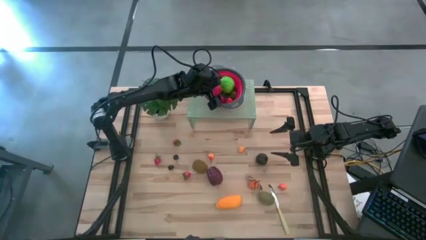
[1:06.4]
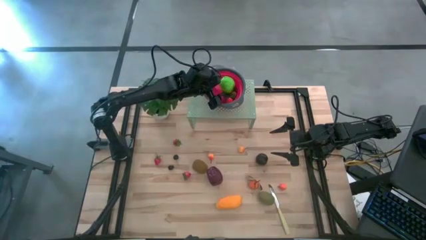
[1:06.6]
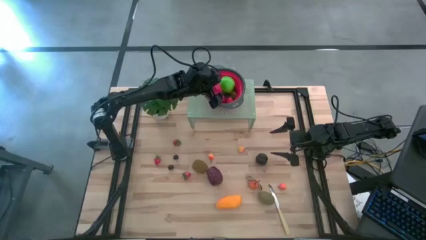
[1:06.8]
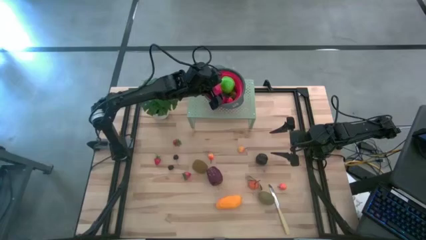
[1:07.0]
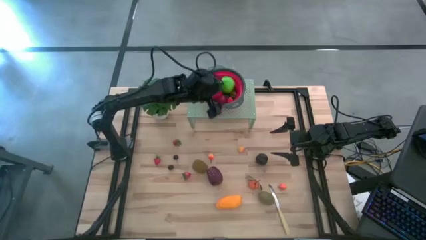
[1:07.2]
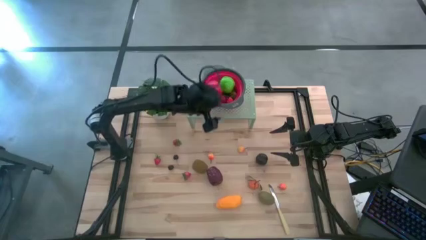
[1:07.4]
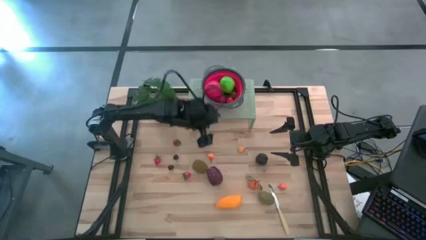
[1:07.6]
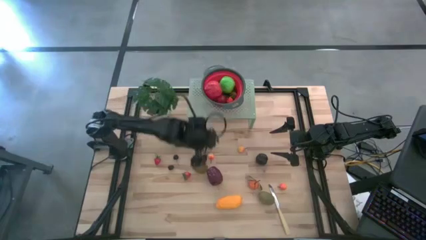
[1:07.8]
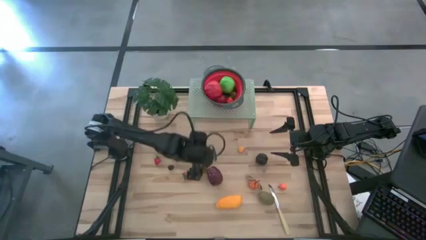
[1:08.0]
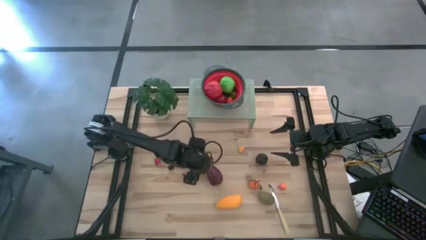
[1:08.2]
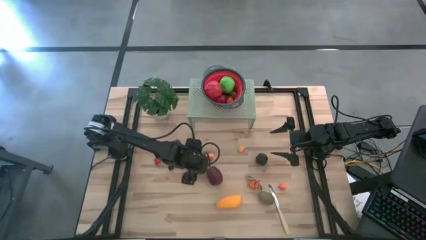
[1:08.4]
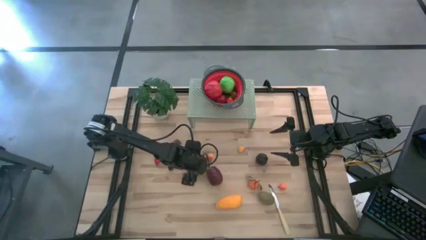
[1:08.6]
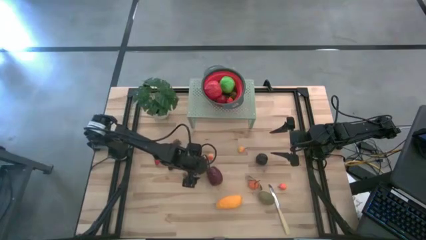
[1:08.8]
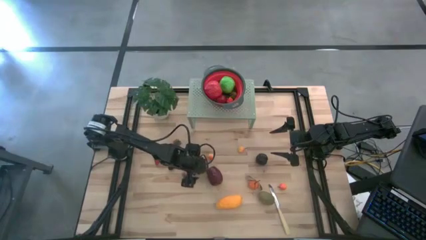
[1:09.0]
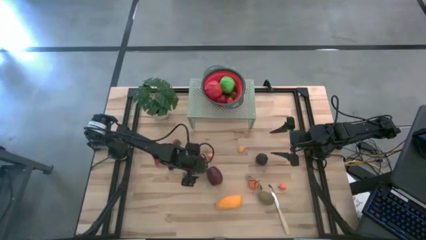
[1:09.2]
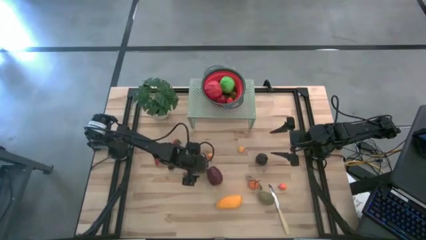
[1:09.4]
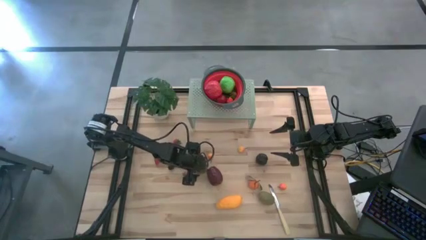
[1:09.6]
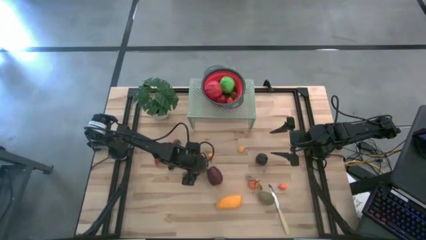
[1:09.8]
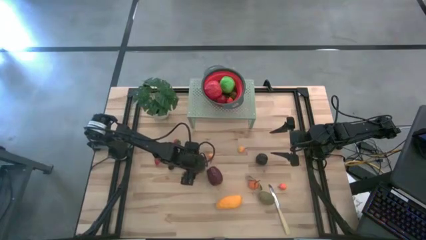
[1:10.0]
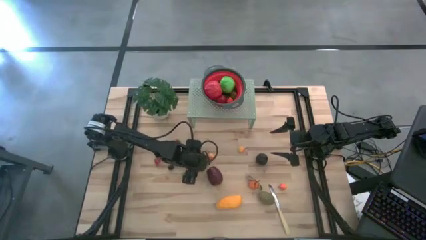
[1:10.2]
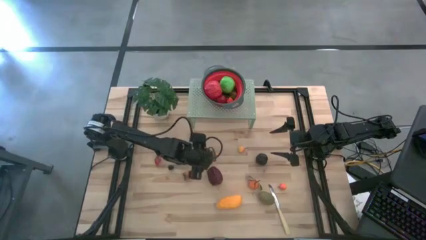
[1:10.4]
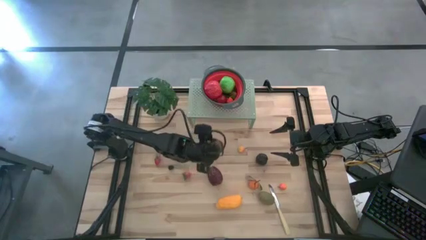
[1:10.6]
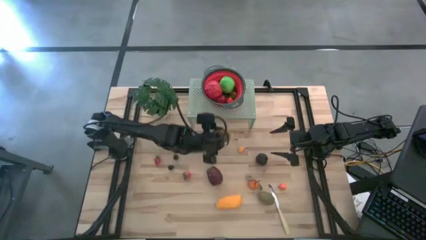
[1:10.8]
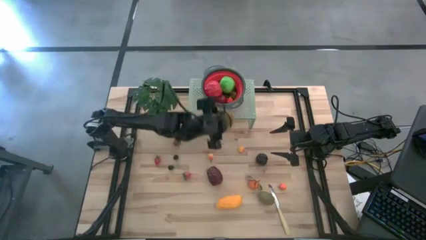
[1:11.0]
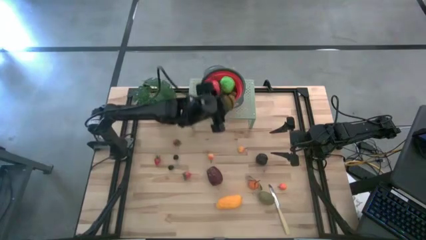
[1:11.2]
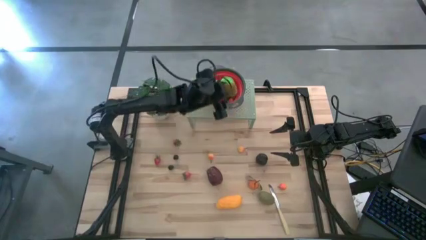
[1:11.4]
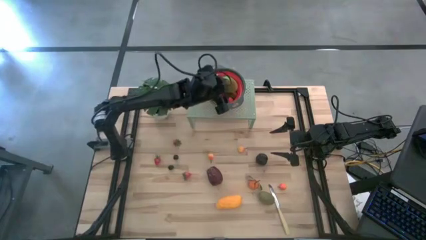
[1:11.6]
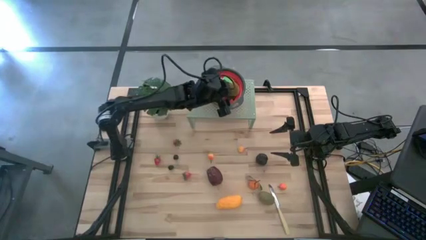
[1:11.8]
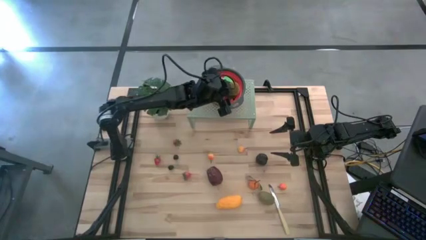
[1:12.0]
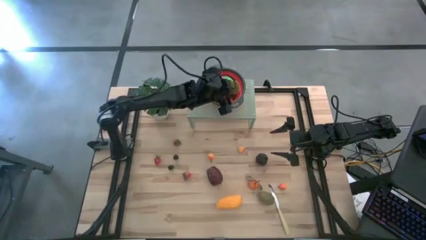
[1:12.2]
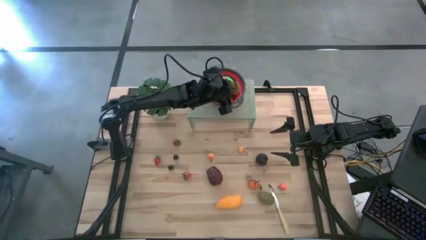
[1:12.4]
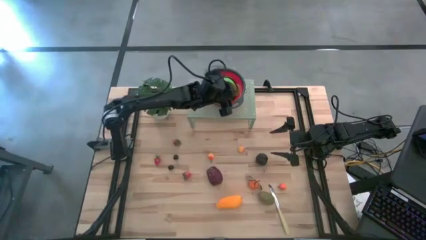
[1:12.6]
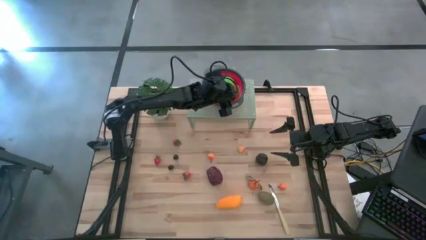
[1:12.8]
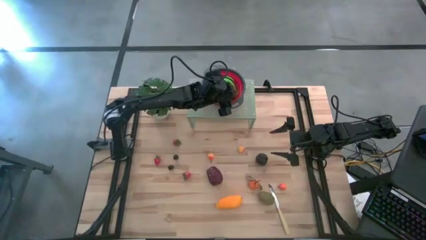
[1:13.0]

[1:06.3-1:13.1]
Task: Pick & Place Fruit
Put the kiwi into the red strainer bowl on the shelf

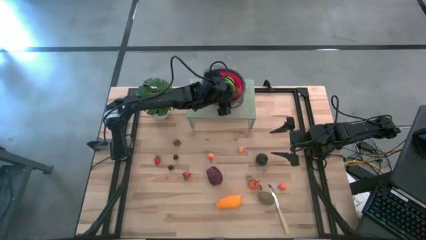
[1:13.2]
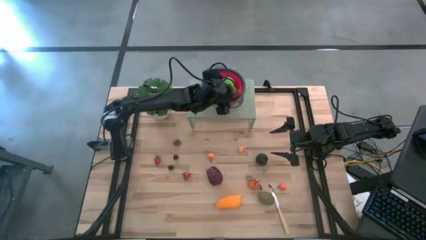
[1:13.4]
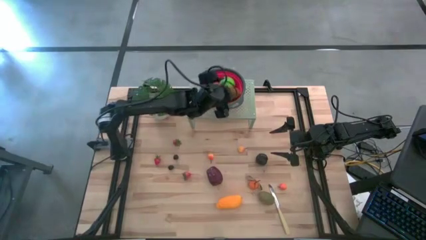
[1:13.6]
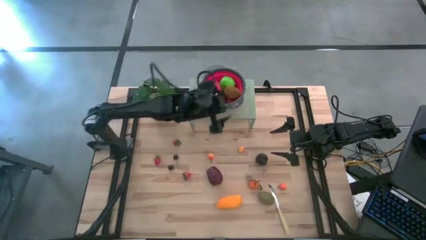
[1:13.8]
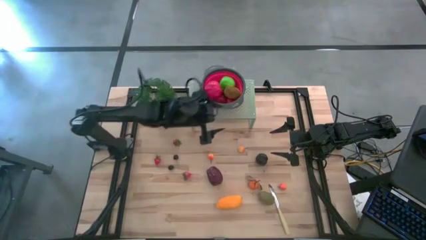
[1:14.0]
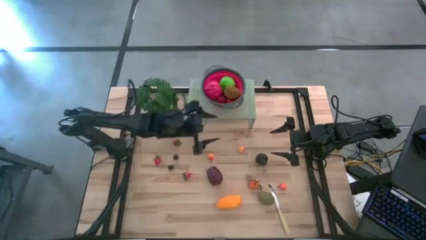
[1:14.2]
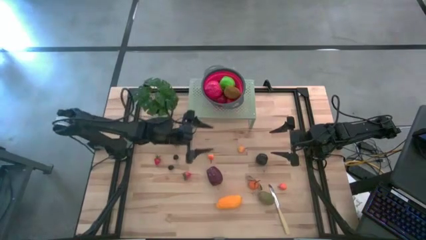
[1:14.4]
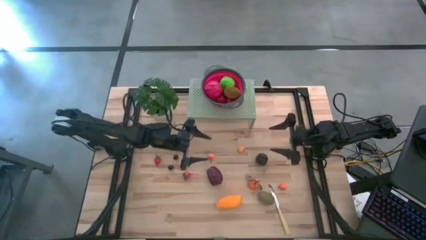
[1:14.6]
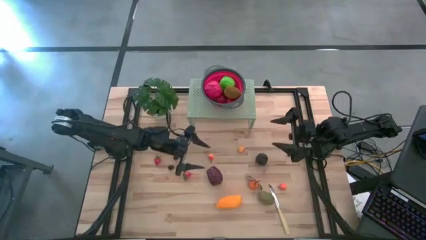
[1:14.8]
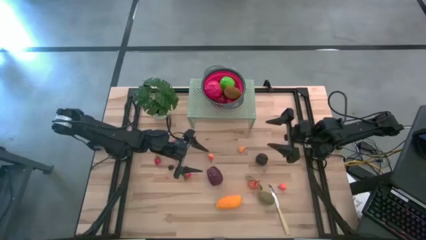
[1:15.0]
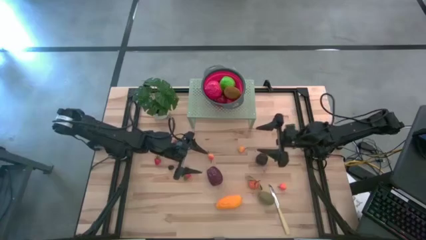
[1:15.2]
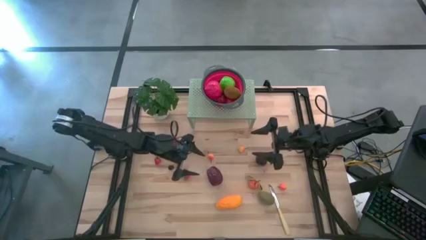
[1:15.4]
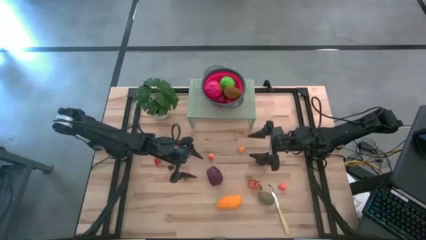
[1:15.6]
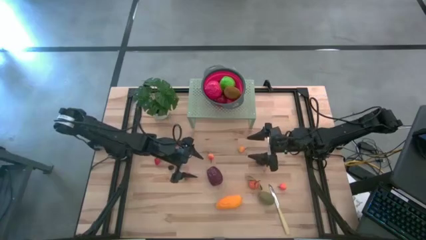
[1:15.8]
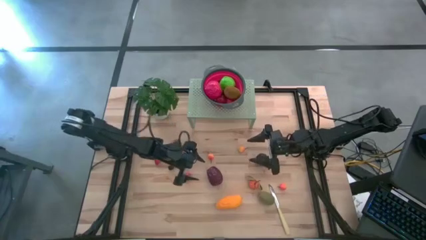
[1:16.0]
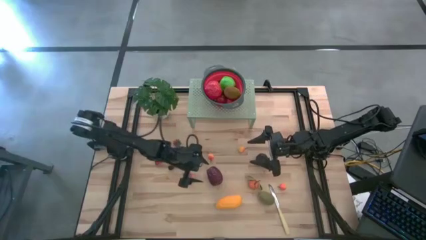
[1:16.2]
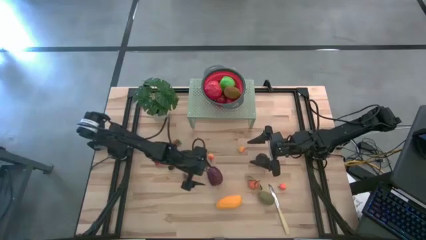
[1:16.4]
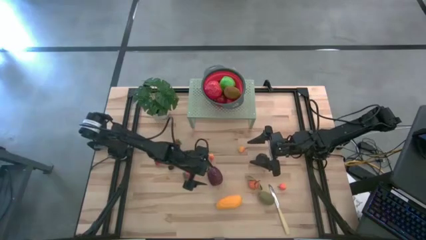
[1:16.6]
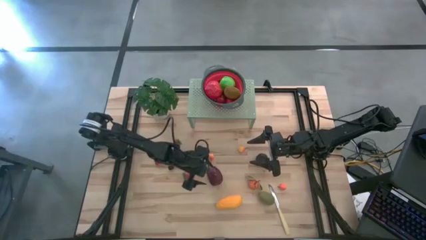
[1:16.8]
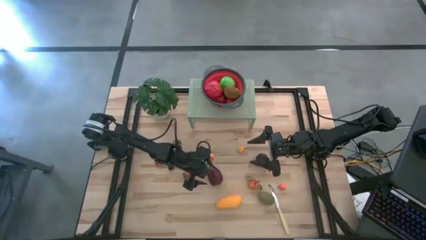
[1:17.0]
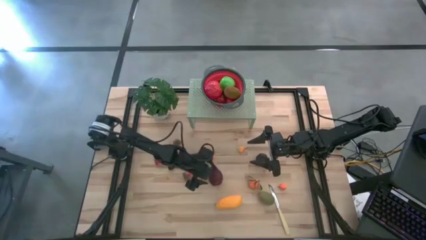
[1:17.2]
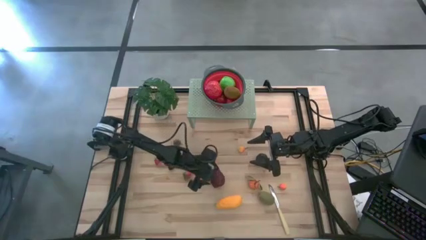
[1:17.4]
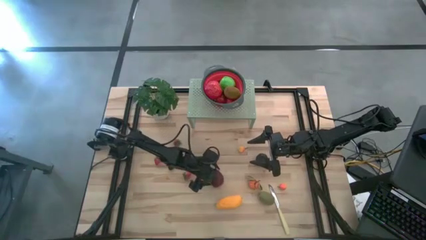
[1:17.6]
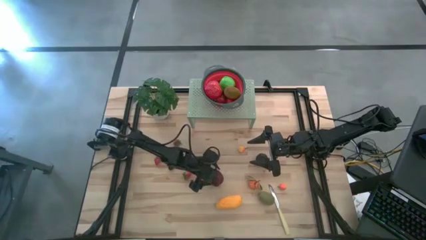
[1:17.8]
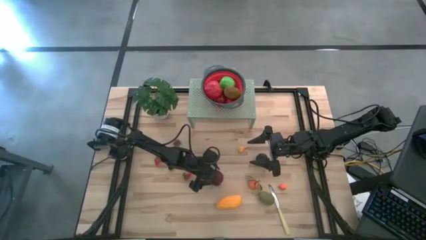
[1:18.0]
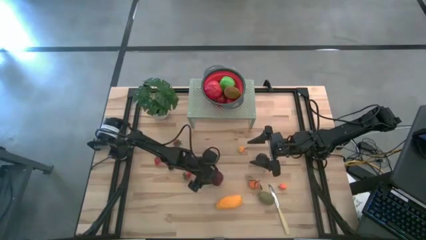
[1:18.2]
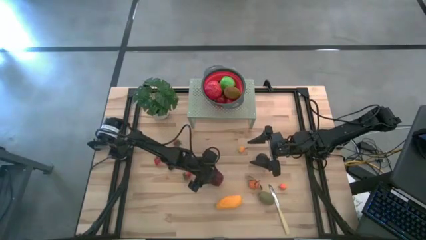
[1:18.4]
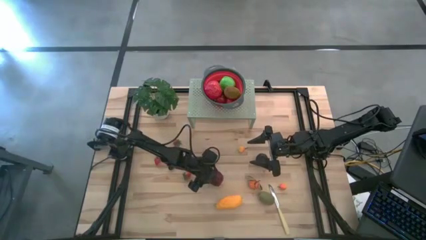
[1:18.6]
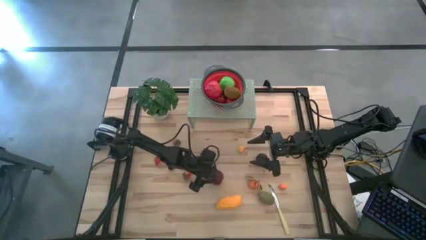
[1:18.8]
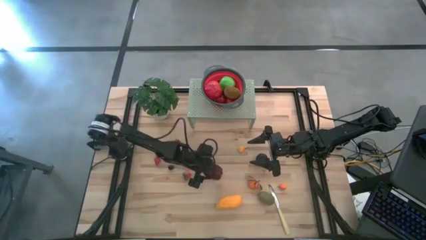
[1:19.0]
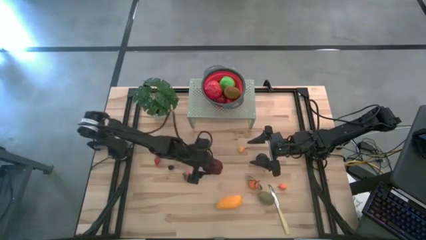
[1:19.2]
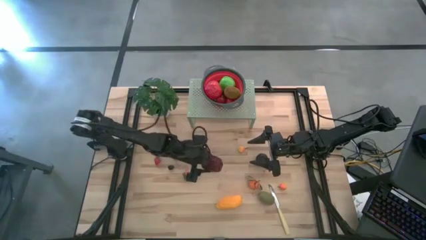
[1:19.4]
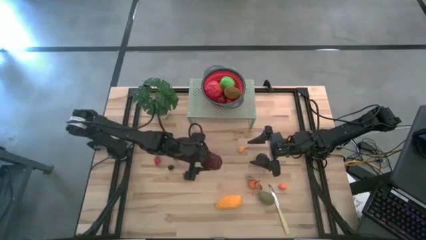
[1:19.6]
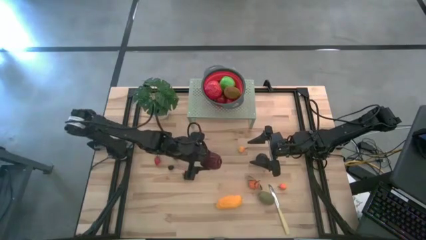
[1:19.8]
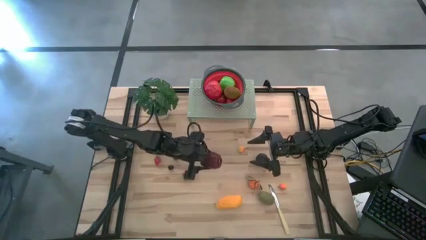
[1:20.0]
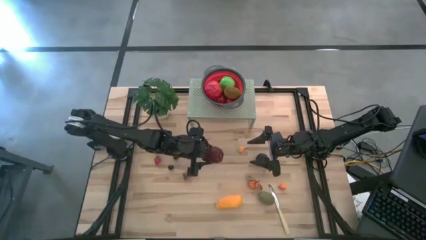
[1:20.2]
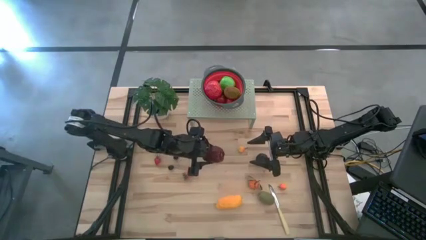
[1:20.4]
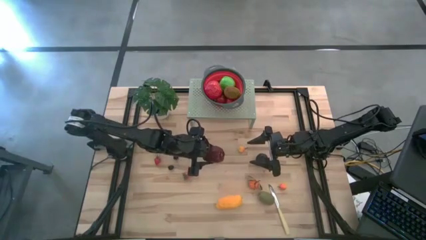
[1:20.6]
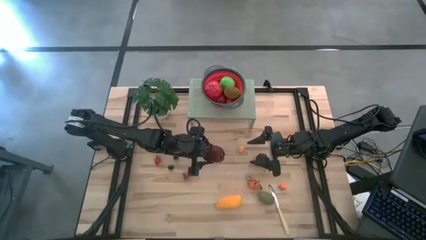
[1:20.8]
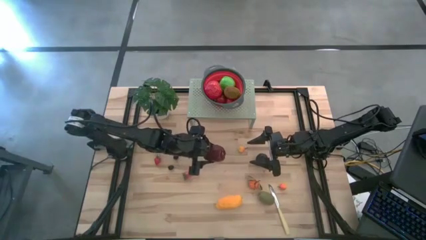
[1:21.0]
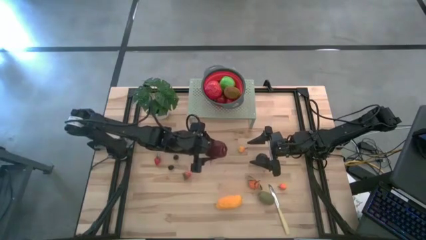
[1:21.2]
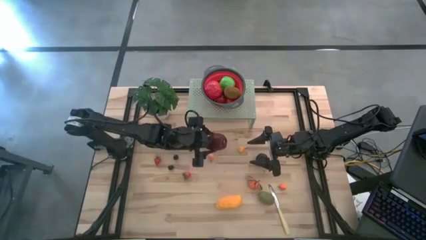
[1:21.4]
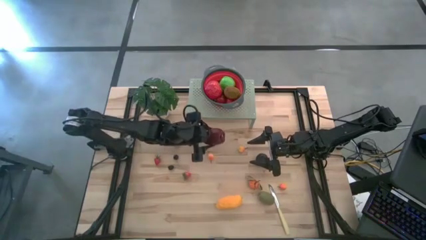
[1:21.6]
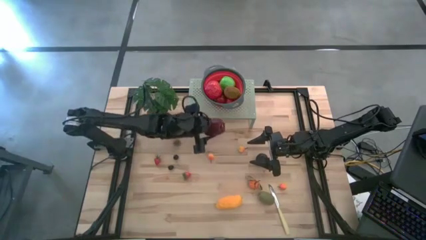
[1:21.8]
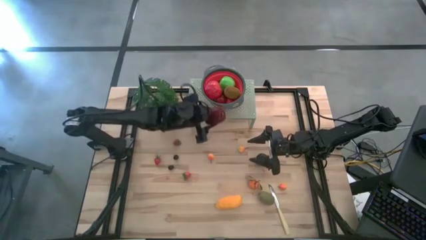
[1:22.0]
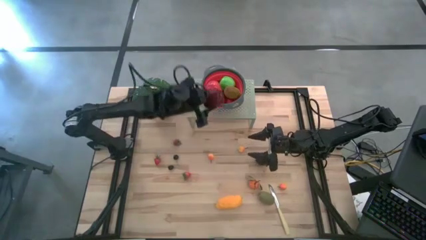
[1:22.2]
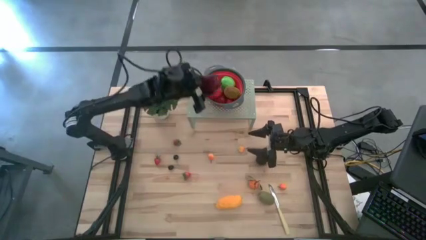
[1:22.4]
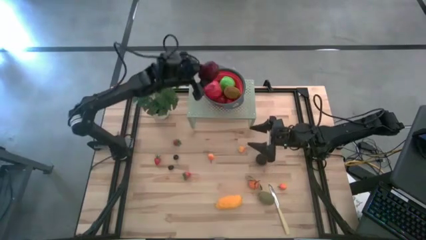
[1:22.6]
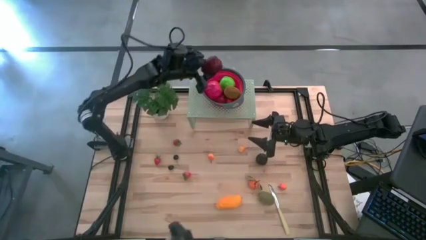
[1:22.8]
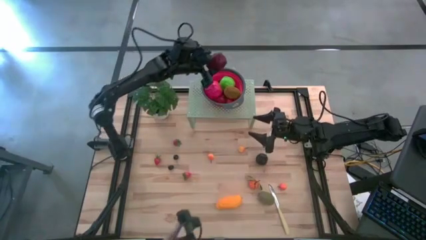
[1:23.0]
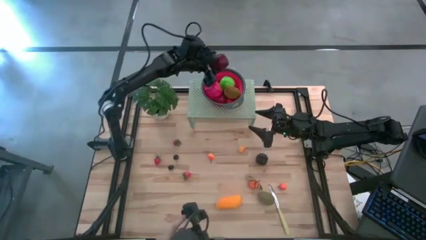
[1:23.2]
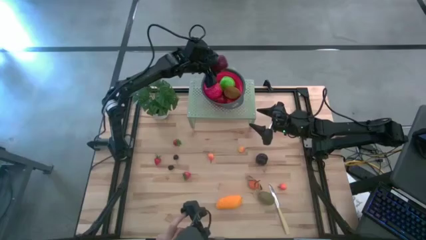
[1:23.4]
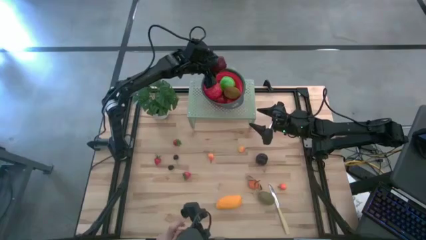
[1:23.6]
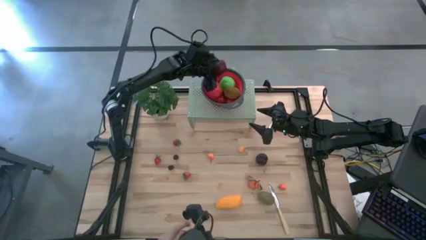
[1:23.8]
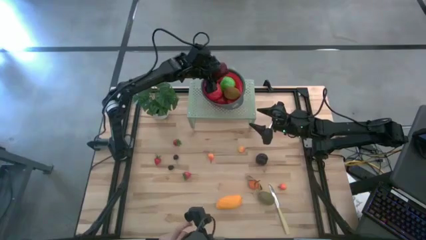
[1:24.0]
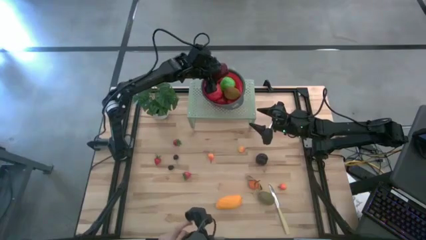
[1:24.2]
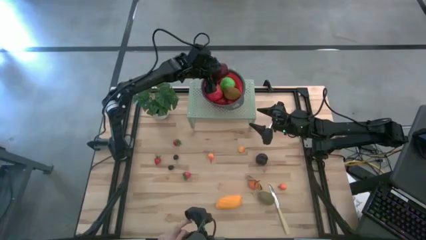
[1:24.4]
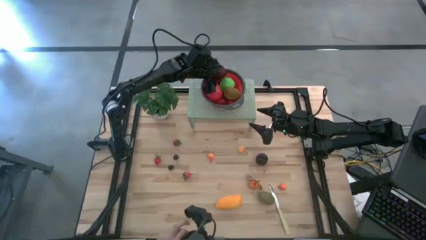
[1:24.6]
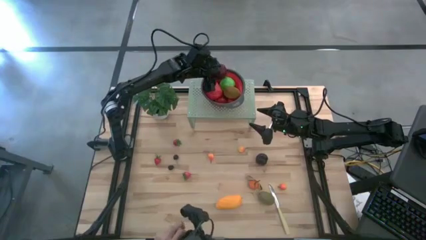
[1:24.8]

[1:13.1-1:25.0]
Put the malay apple into the red strainer bowl on the shelf
